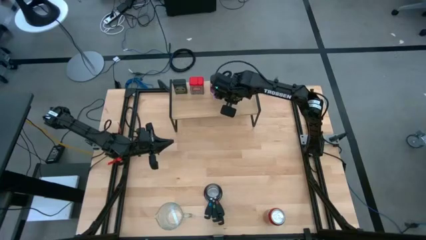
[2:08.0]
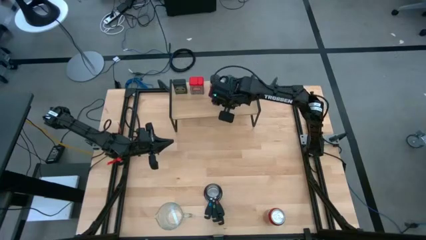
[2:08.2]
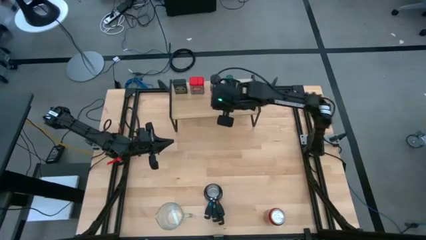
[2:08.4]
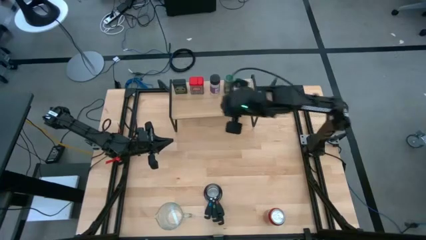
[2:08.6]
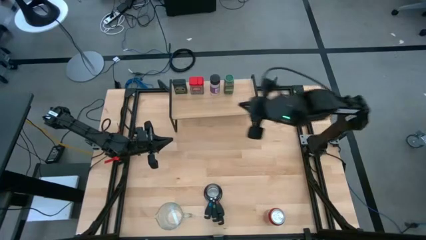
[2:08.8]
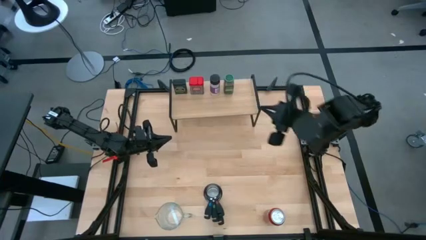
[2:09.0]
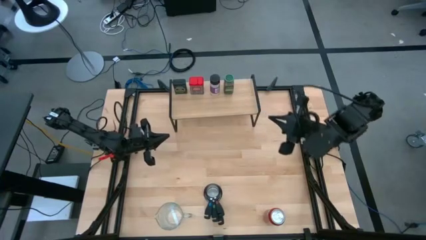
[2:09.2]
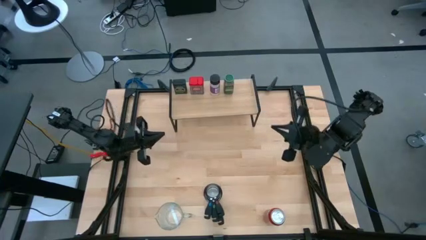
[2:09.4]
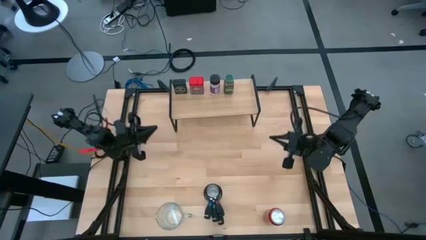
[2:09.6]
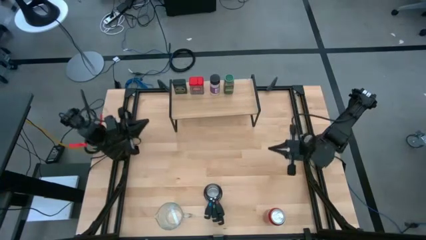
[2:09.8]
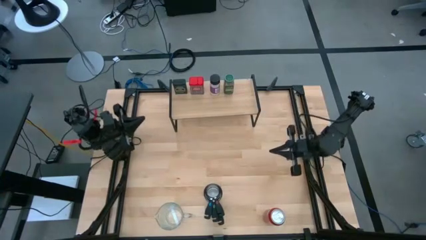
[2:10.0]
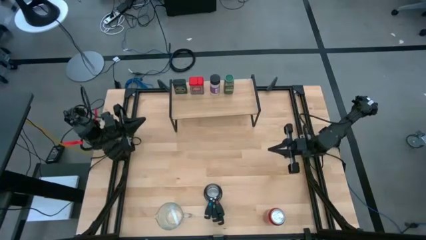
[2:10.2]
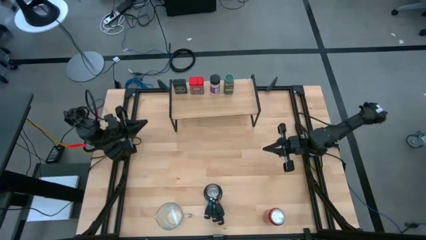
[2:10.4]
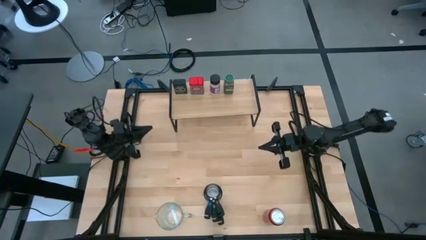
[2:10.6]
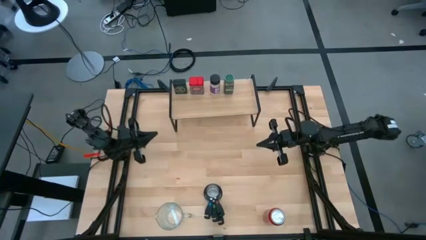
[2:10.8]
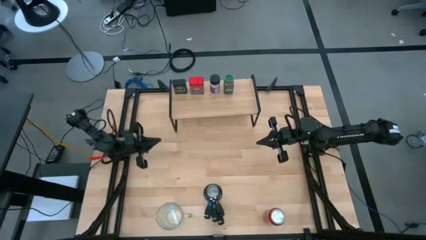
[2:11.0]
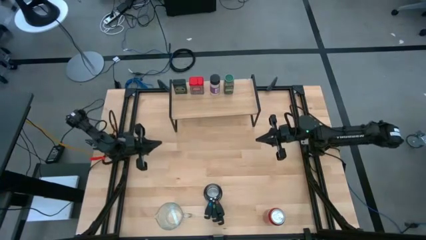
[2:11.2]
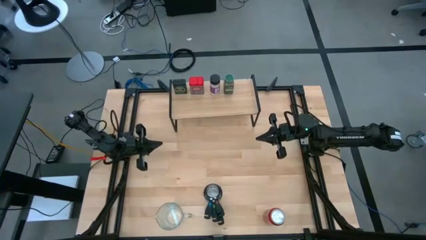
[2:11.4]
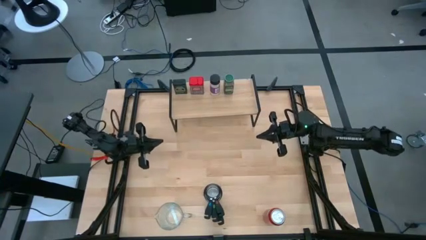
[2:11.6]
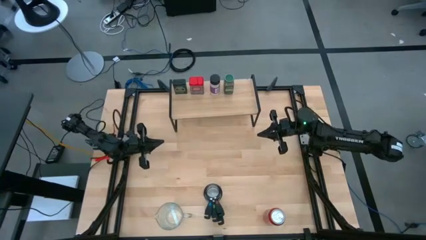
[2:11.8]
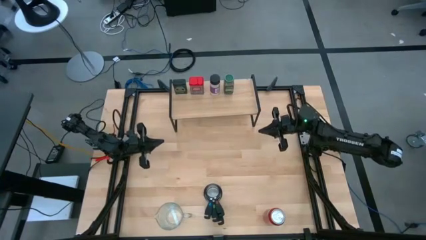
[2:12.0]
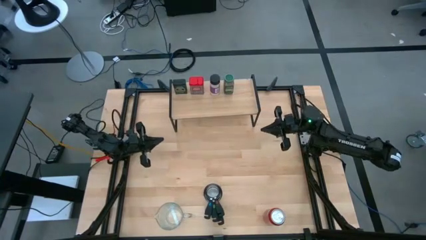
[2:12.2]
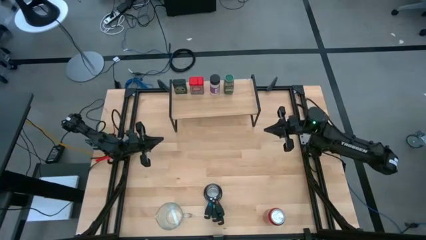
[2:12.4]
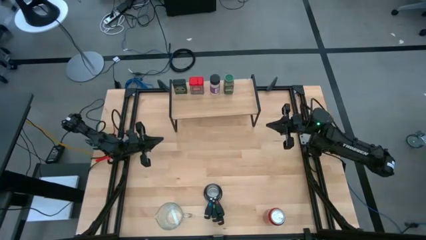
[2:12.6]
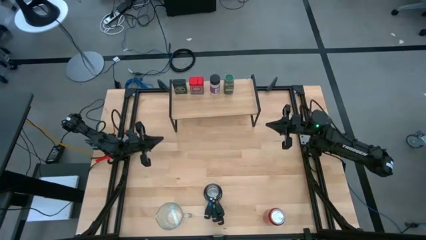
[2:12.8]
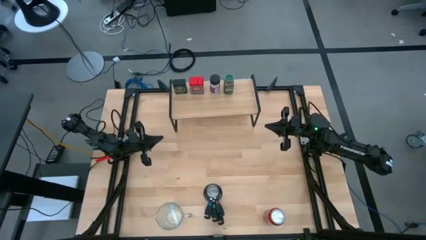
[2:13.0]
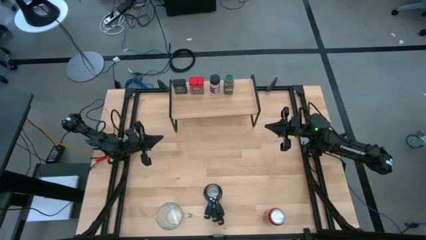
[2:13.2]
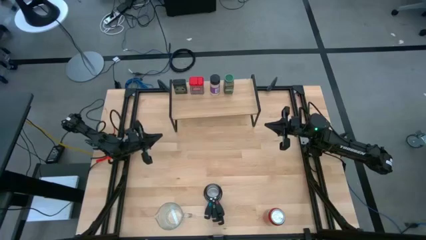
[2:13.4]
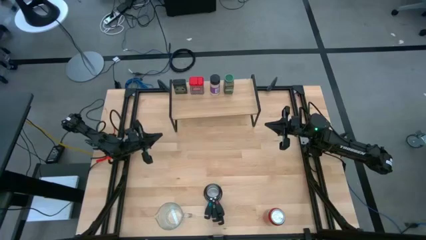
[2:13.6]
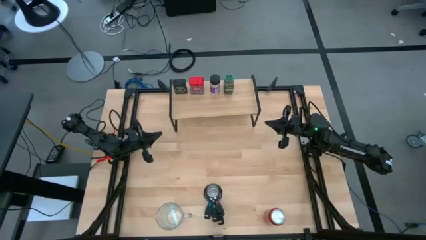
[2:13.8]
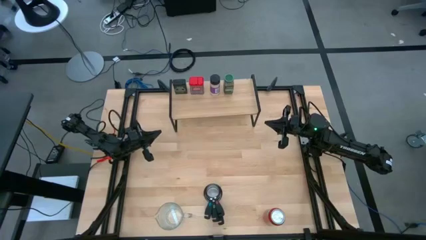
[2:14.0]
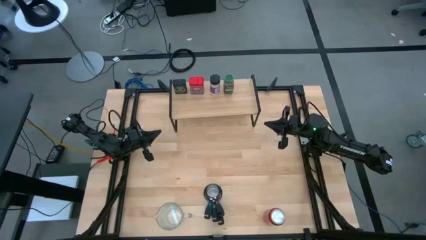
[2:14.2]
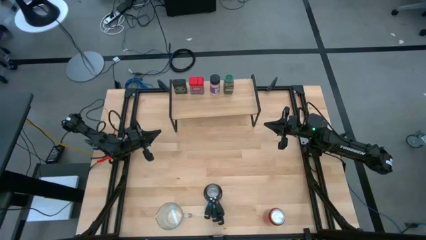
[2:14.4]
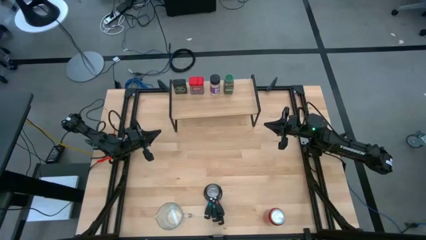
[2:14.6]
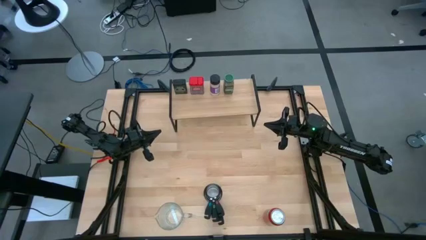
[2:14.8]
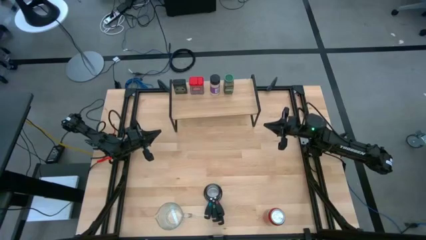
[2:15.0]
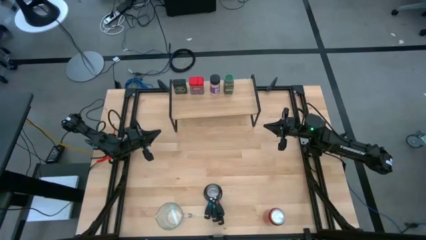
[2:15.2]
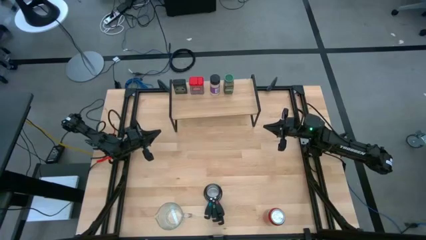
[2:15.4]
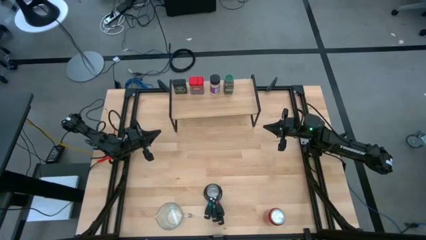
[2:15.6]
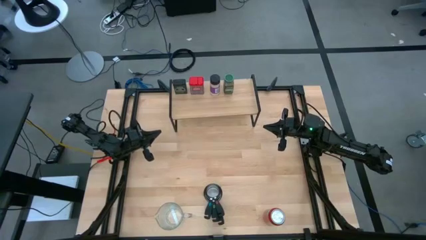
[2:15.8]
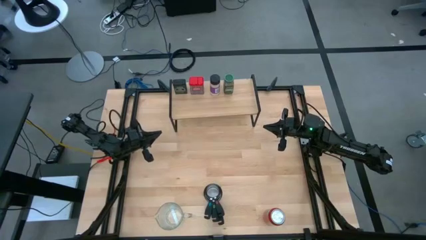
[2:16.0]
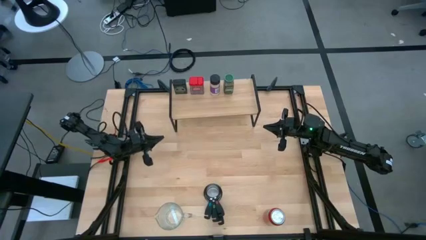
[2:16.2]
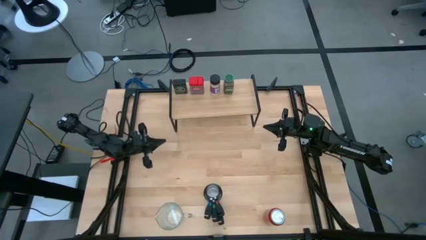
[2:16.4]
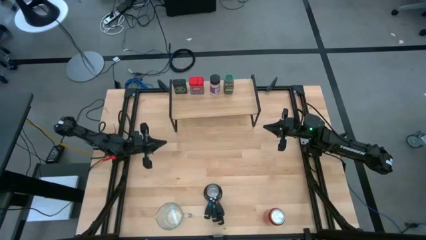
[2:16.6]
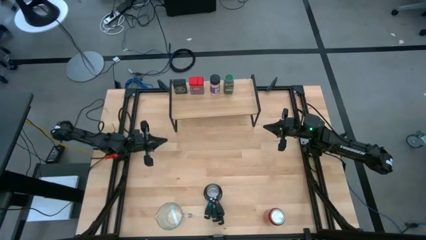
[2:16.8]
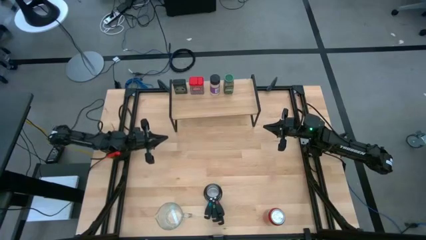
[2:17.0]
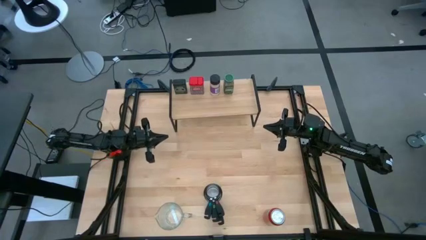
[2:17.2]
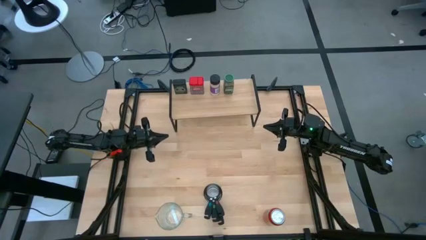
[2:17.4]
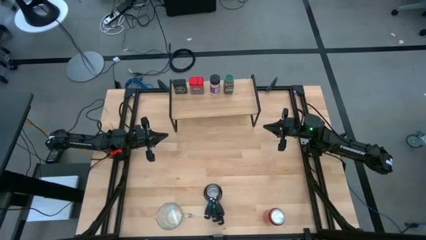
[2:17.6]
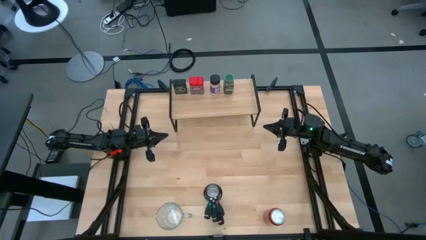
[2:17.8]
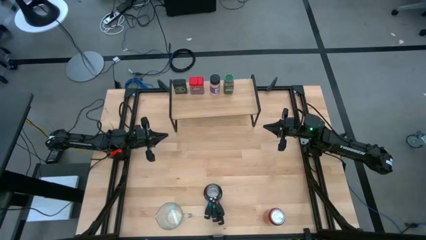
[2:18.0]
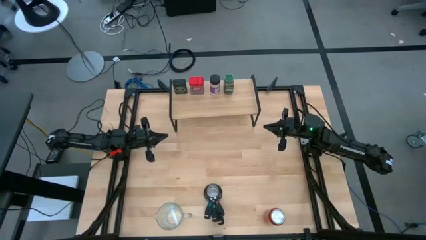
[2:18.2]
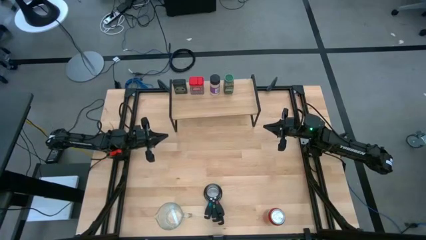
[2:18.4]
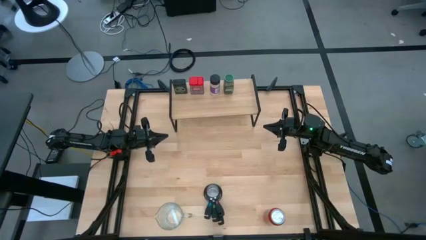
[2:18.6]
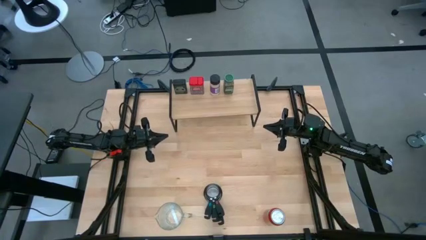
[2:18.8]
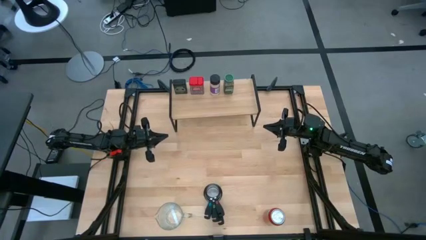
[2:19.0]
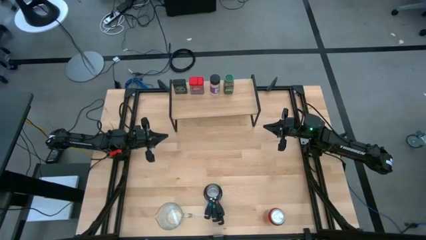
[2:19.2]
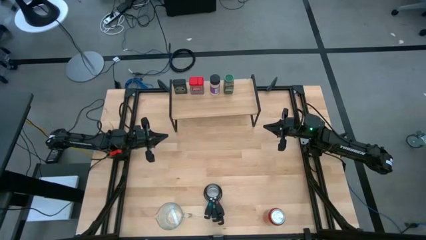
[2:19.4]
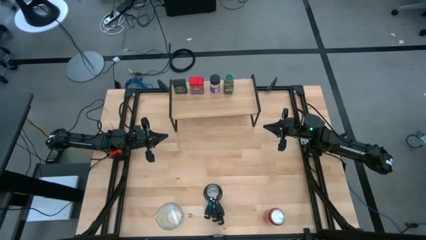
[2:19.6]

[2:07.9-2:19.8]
Task: Shelf spices
Return to Home Position

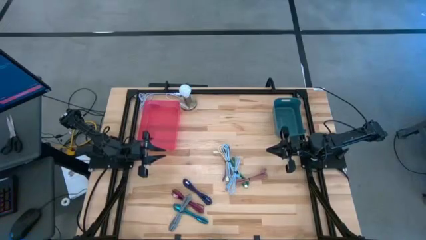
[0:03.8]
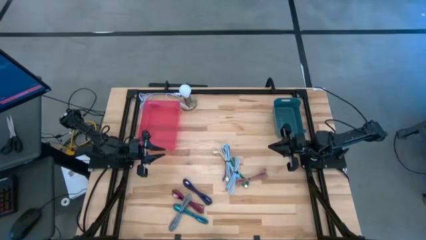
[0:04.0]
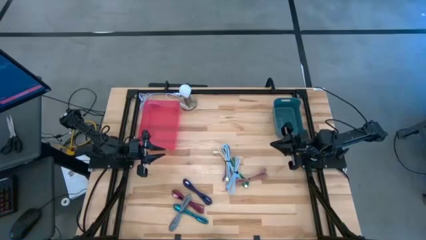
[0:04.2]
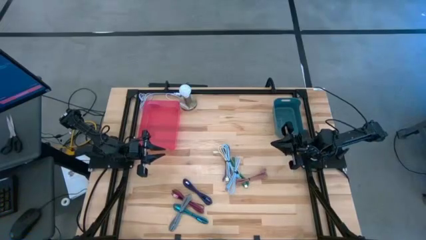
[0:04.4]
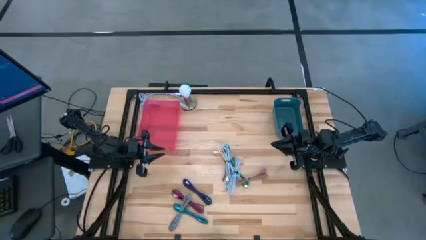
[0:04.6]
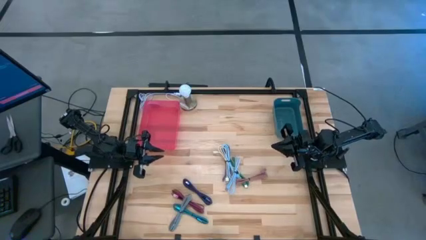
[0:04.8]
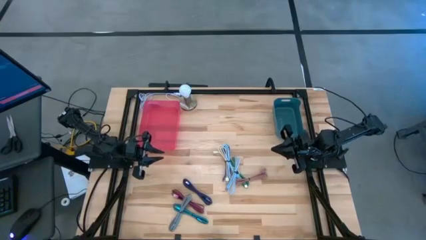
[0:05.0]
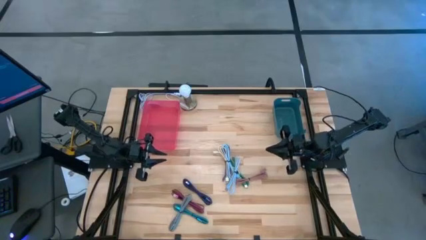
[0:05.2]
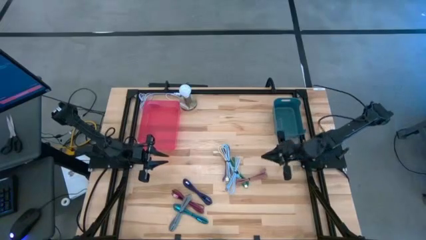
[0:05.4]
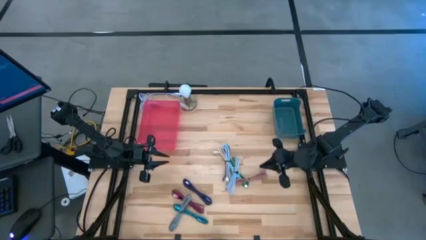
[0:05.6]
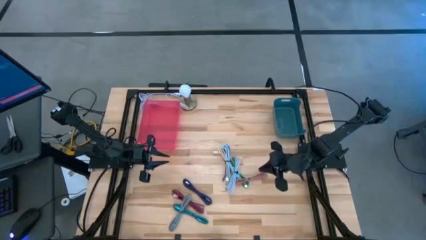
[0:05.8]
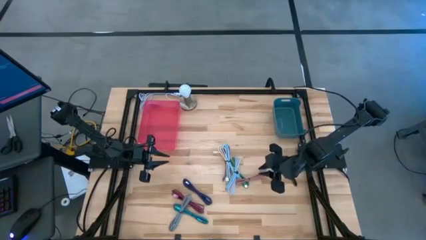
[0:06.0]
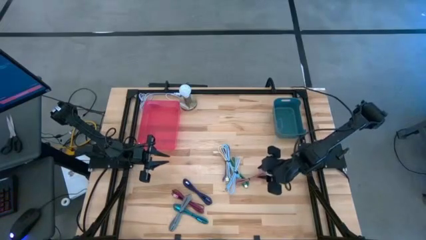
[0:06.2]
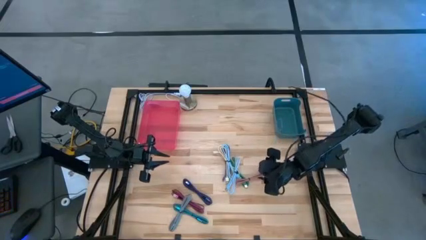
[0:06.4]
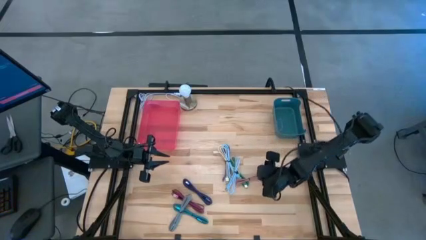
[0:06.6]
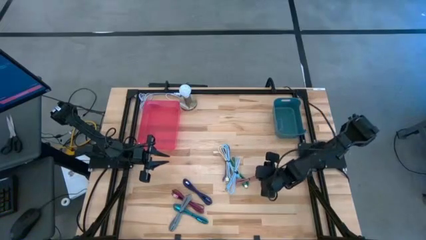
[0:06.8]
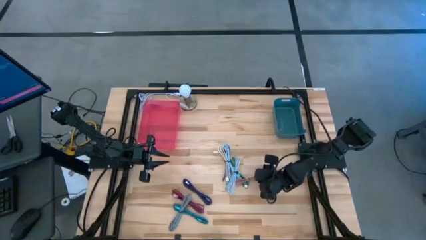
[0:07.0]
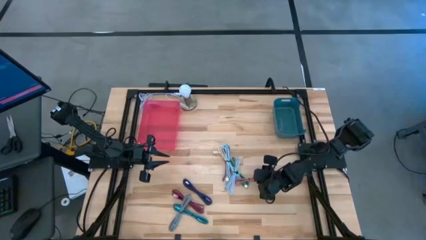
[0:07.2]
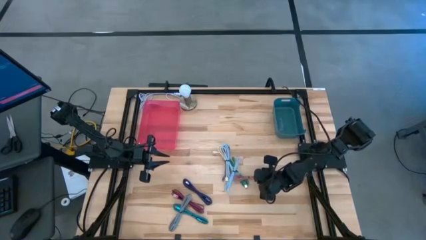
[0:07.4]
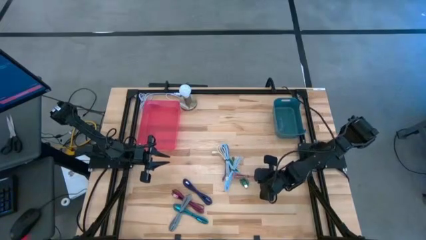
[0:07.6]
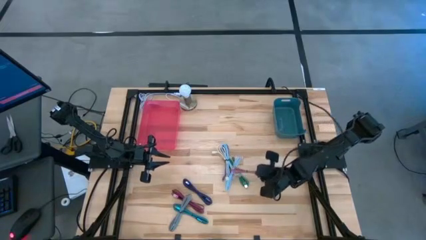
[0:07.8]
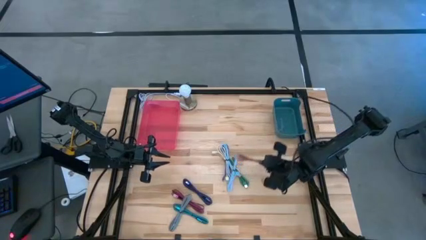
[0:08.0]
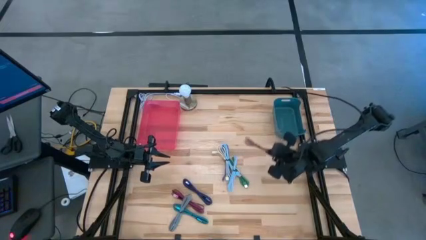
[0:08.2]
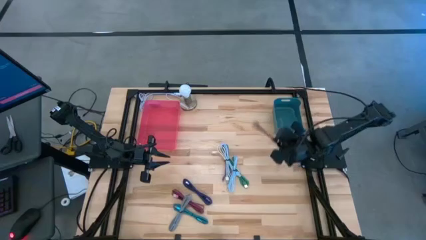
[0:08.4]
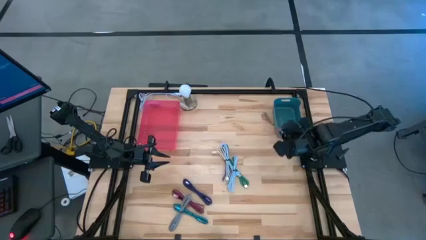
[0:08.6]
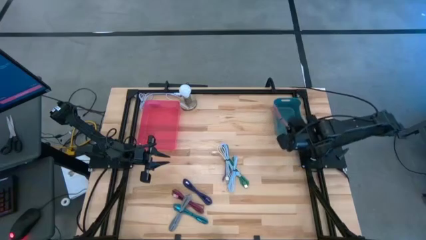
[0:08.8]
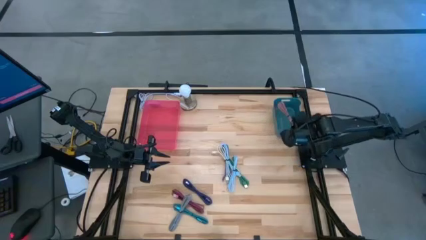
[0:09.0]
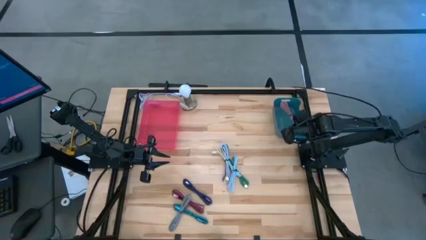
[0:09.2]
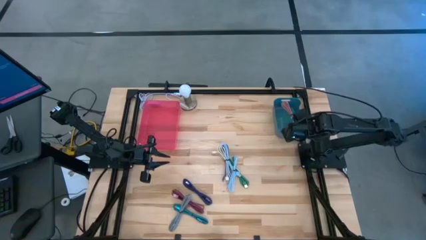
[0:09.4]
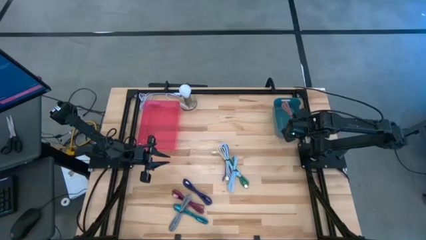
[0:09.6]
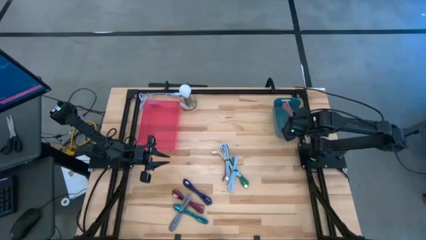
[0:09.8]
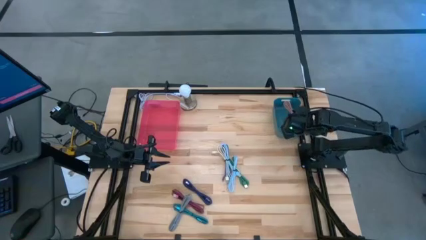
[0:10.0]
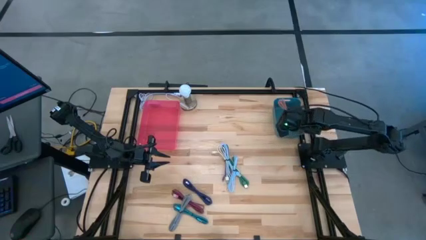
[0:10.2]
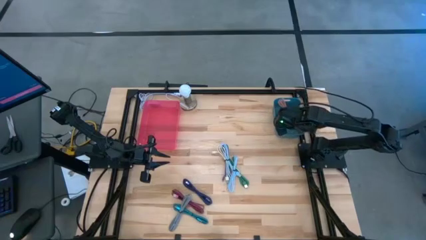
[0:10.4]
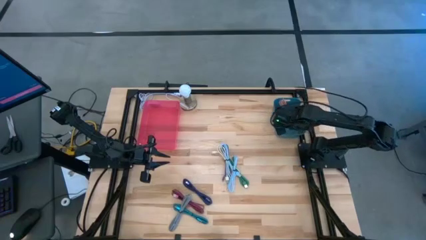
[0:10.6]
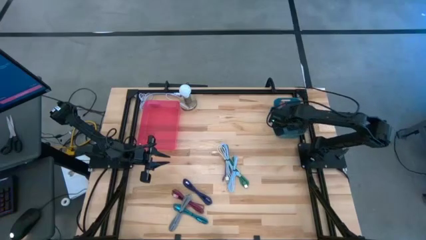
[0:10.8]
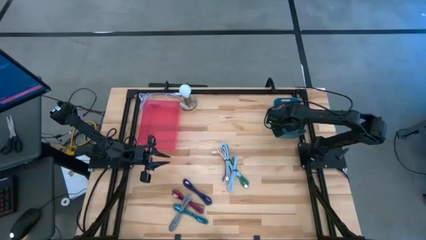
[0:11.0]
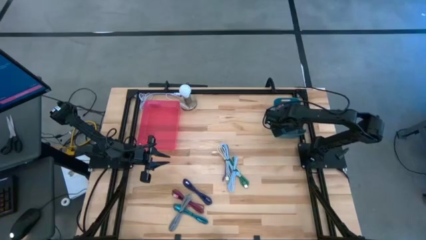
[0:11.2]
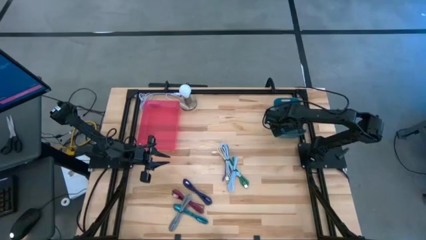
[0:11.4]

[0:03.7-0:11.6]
Task: Pick & Place USB Port
Put the pink charger cable into the blue bin
